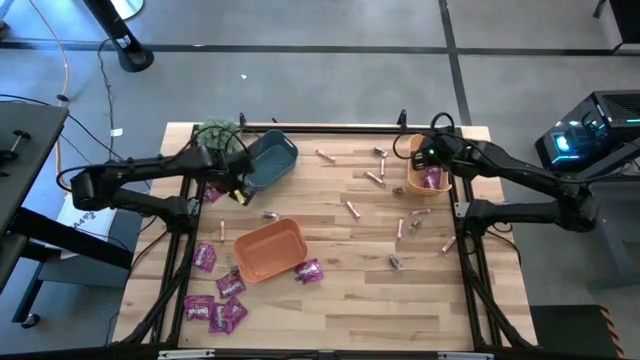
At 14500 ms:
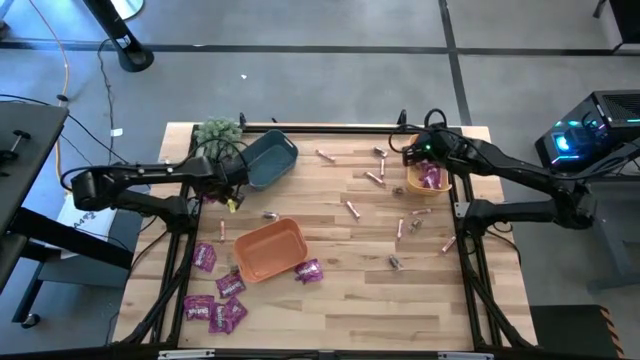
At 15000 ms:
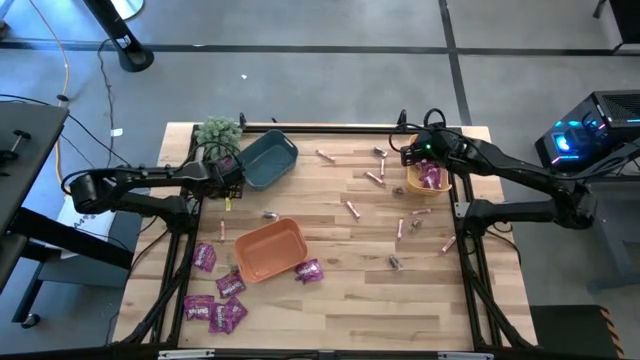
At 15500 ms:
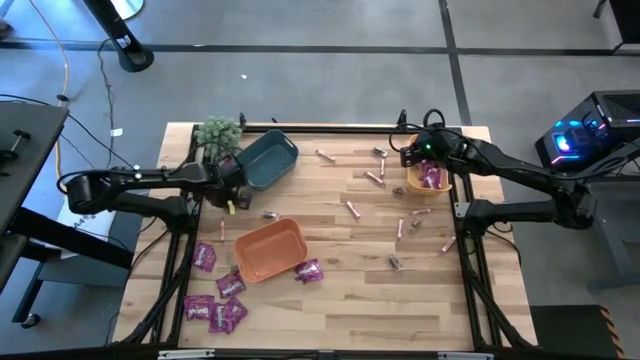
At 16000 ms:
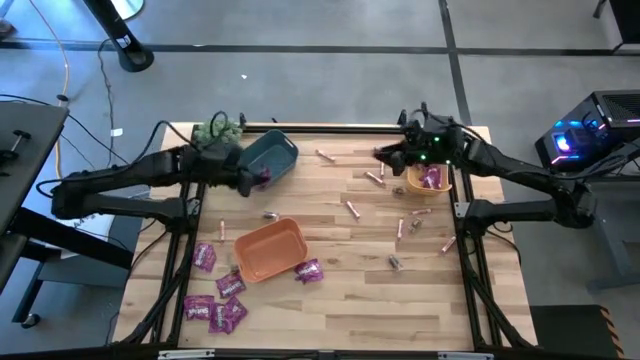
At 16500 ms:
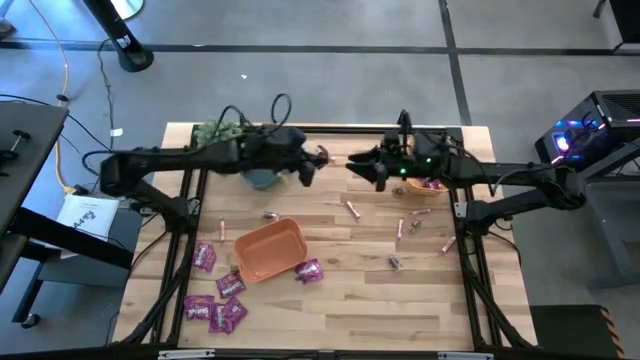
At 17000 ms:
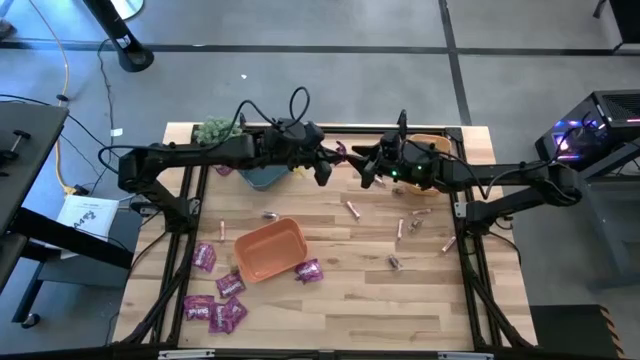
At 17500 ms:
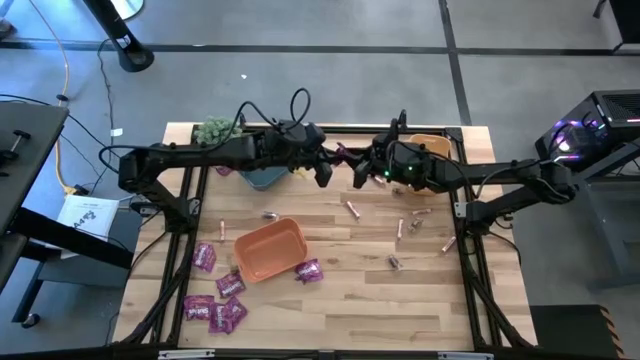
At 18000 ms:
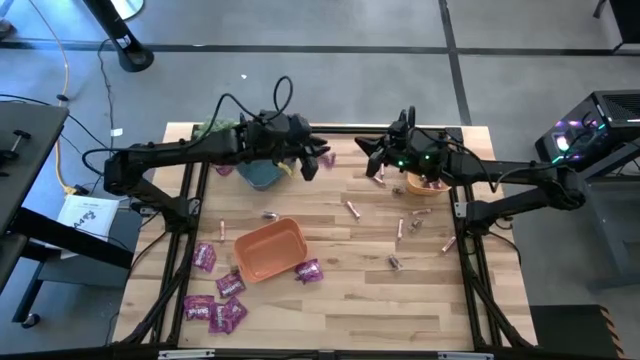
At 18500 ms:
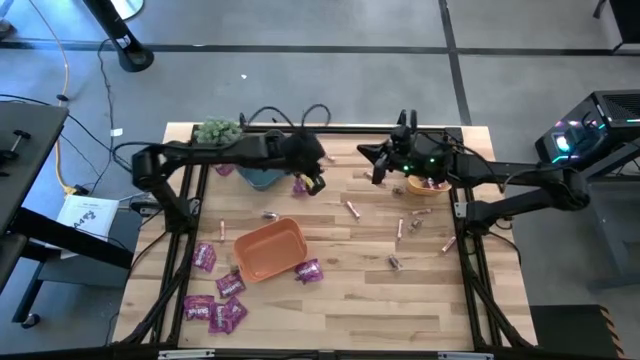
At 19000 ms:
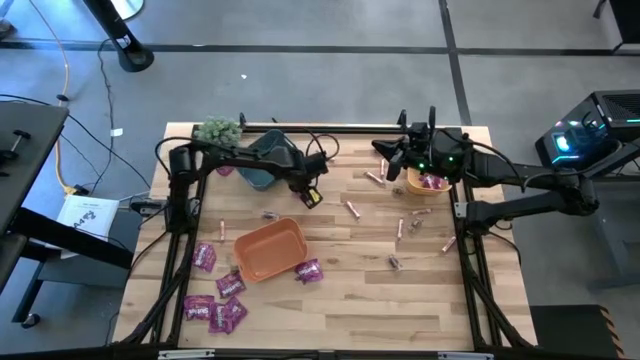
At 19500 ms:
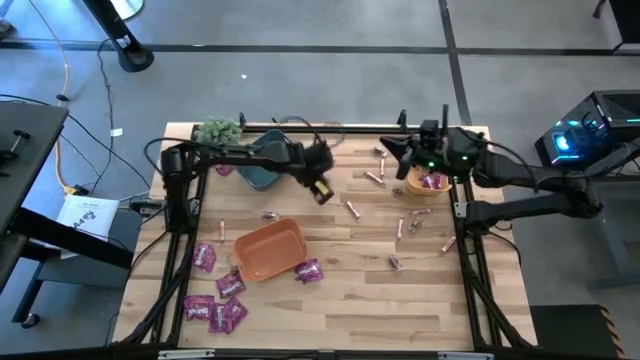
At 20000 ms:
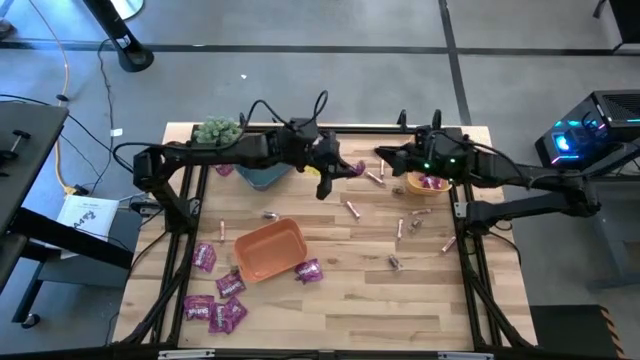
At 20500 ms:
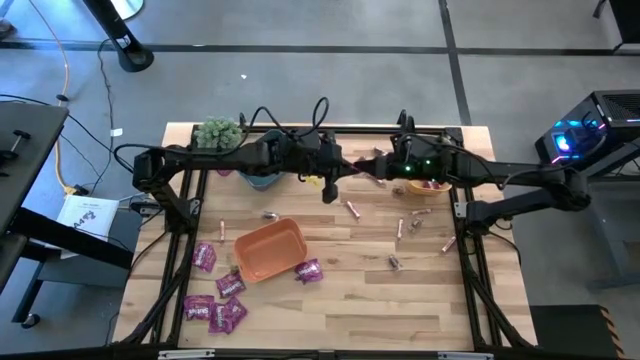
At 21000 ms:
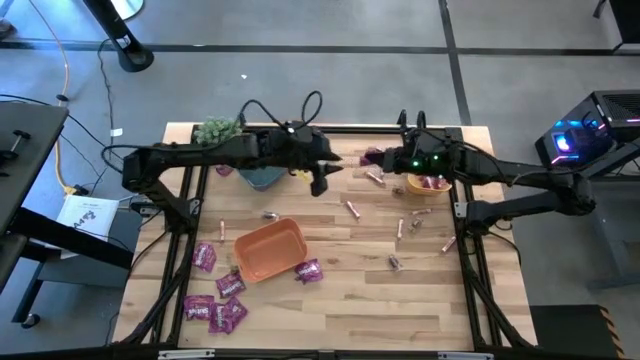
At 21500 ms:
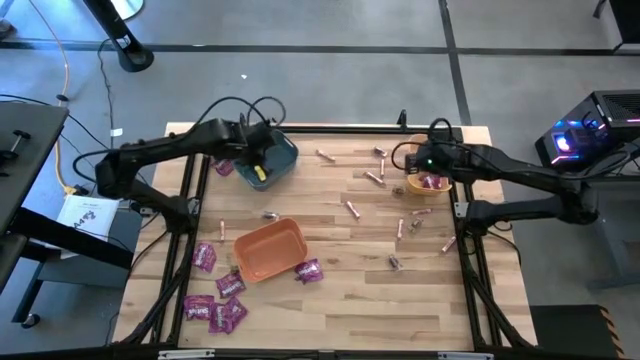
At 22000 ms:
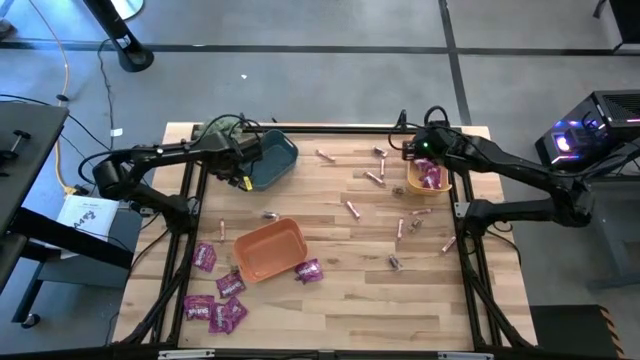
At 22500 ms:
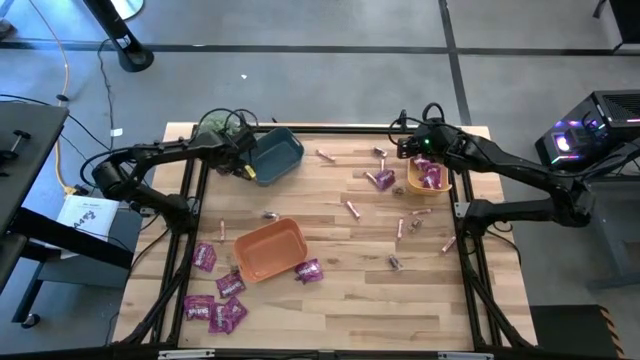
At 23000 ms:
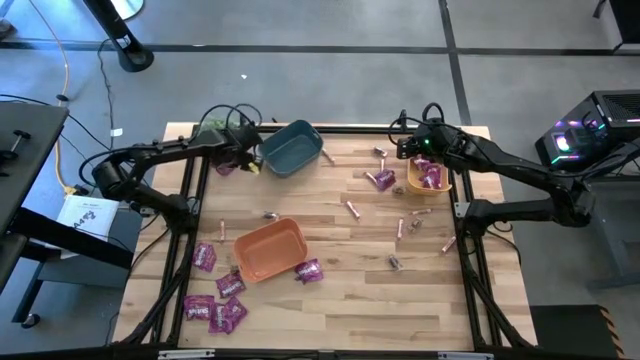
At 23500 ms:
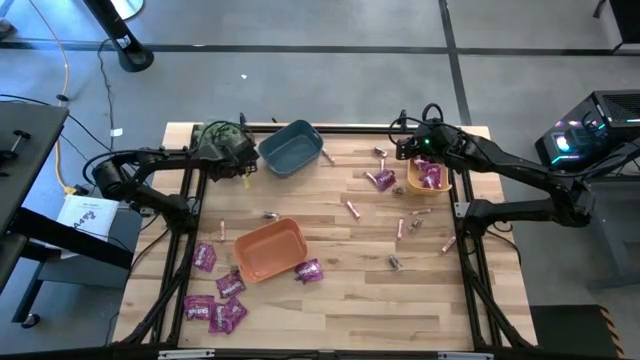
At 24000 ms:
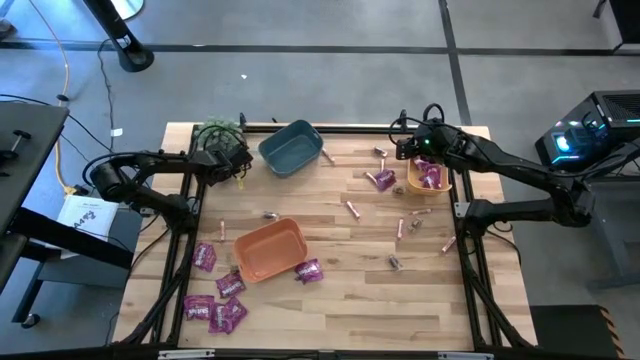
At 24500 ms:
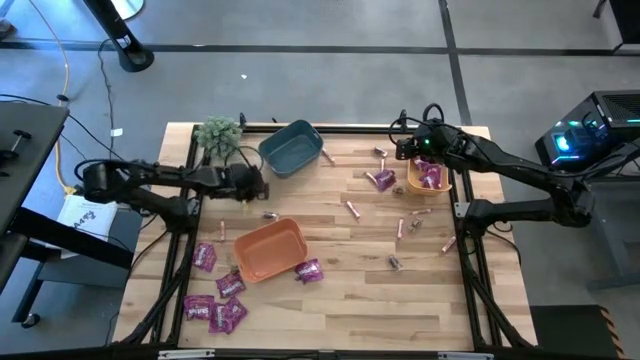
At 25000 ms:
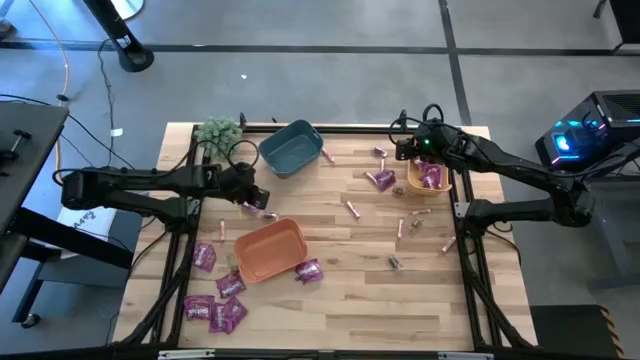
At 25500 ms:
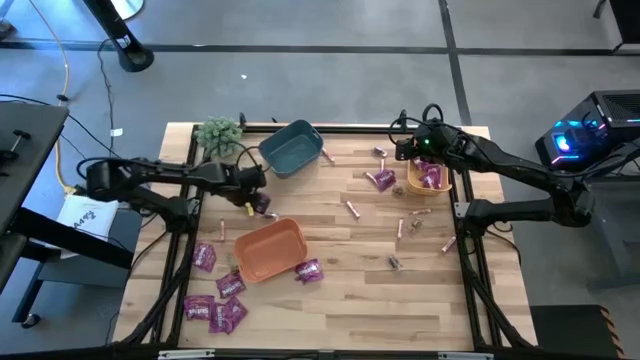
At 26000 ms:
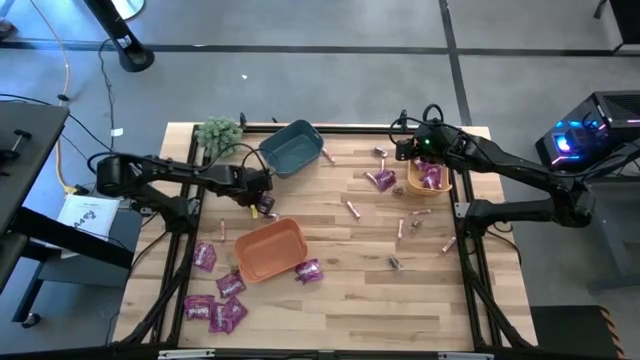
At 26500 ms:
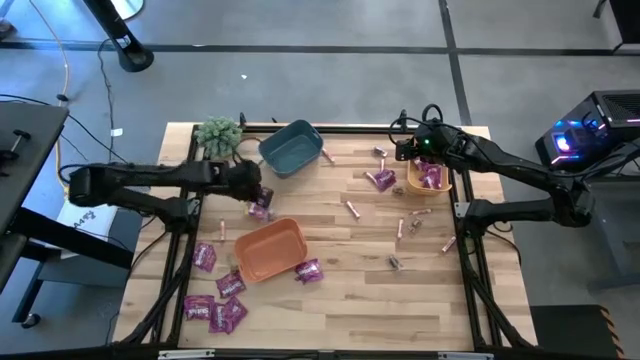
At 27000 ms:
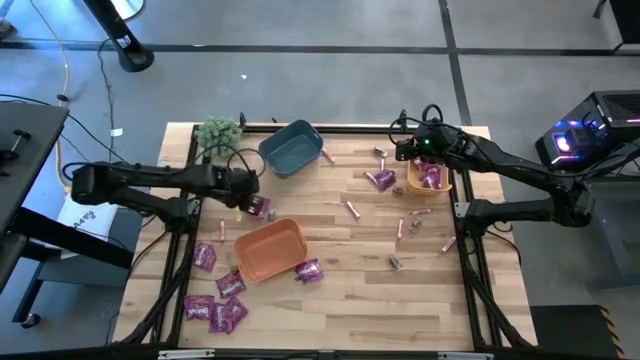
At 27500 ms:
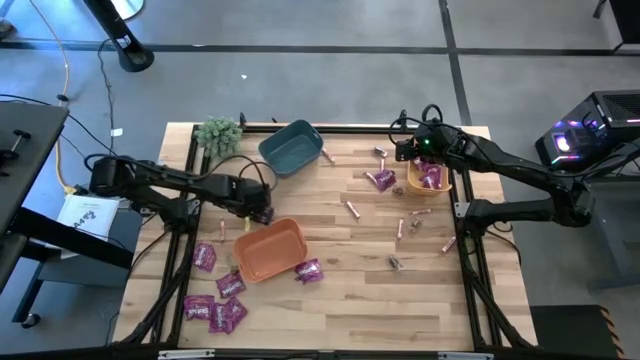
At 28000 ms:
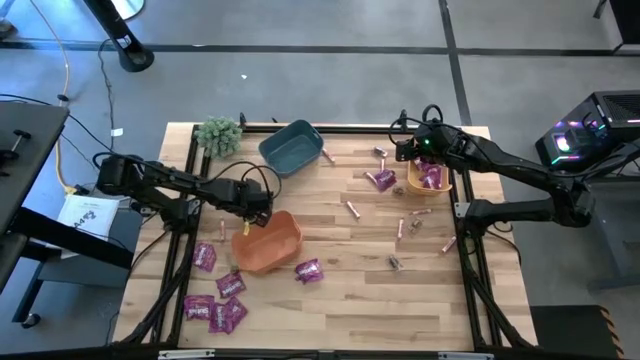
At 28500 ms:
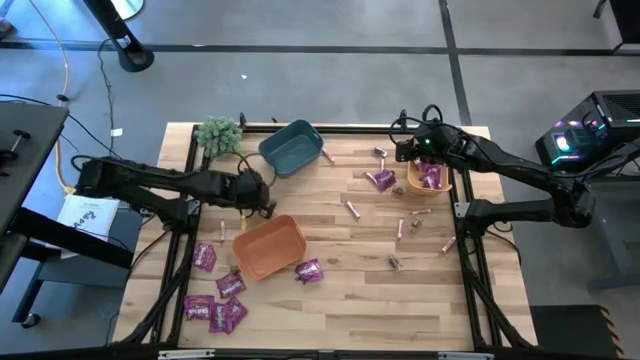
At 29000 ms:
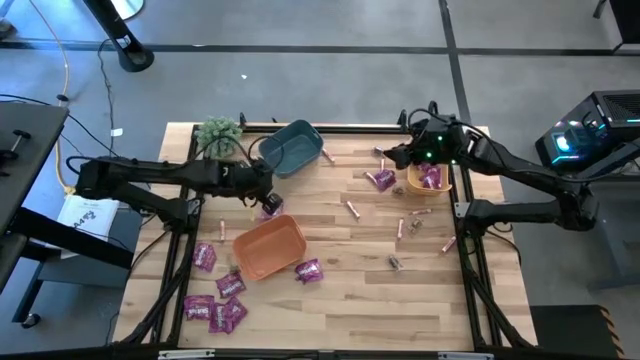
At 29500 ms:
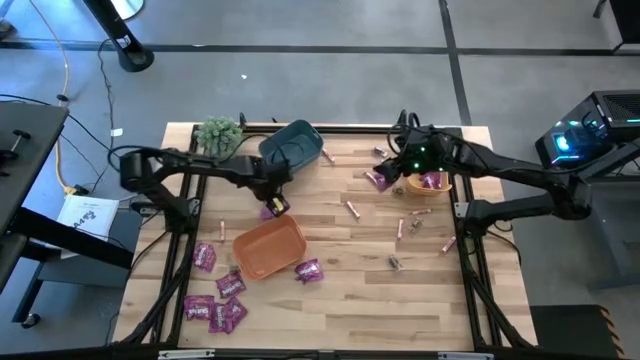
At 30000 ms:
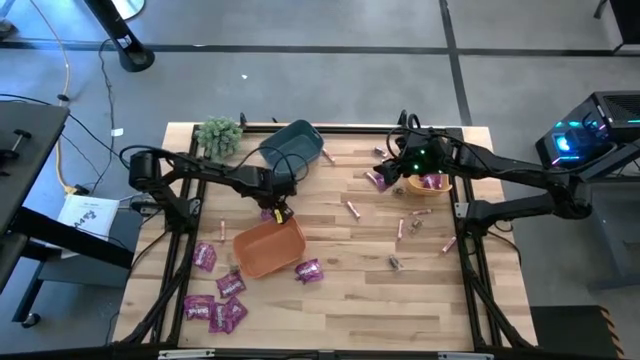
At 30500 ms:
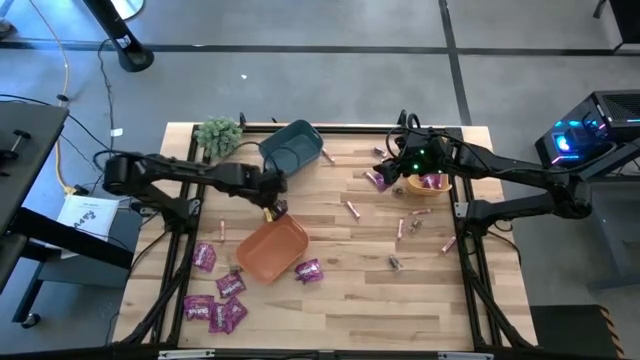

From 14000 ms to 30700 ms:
Task: Sort candy
Put the purple candy into the yellow bin

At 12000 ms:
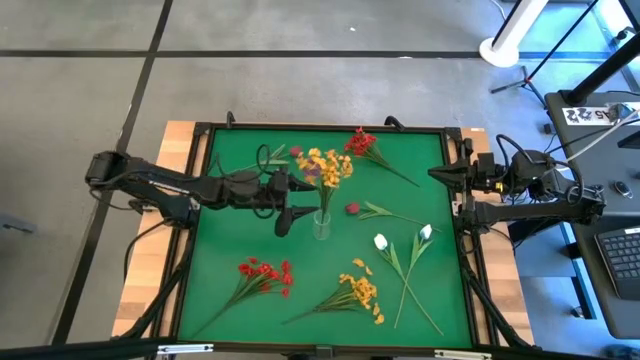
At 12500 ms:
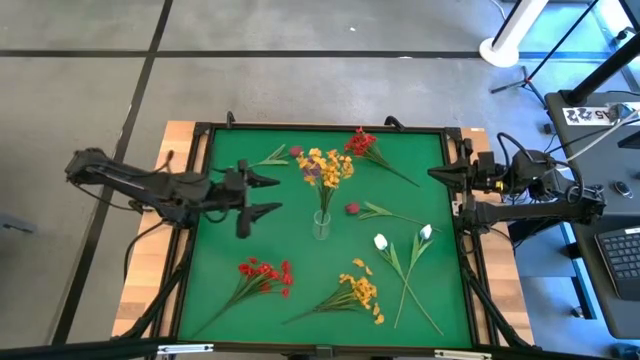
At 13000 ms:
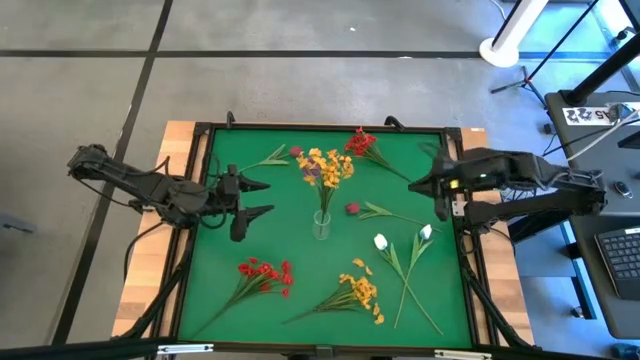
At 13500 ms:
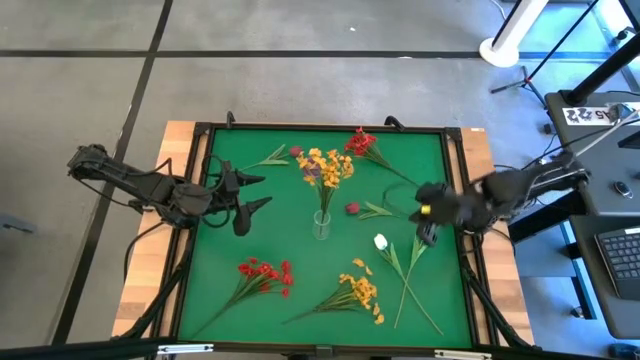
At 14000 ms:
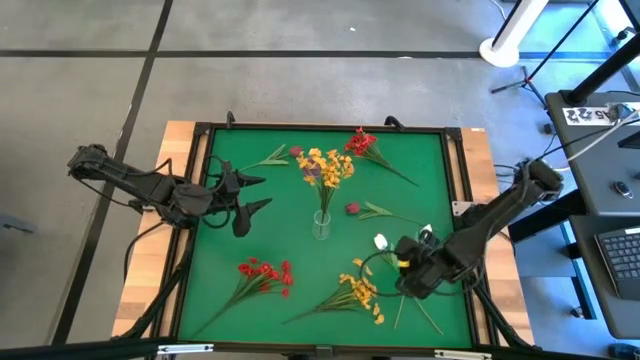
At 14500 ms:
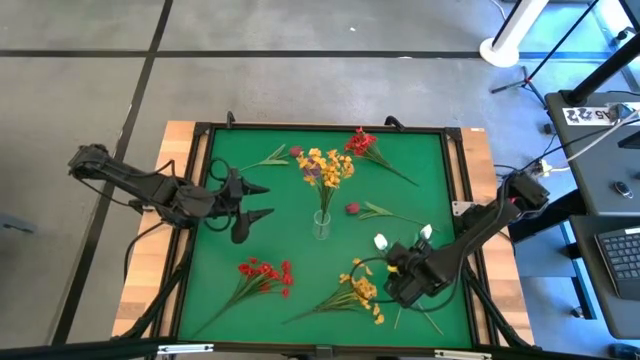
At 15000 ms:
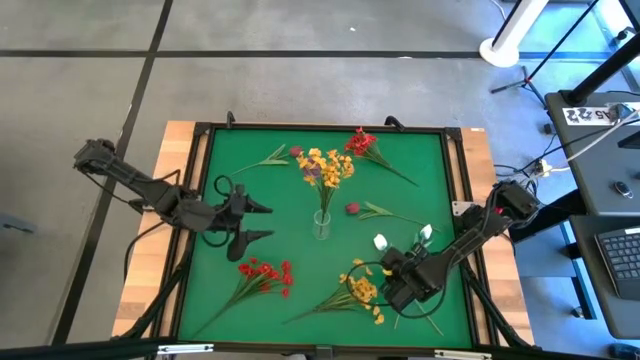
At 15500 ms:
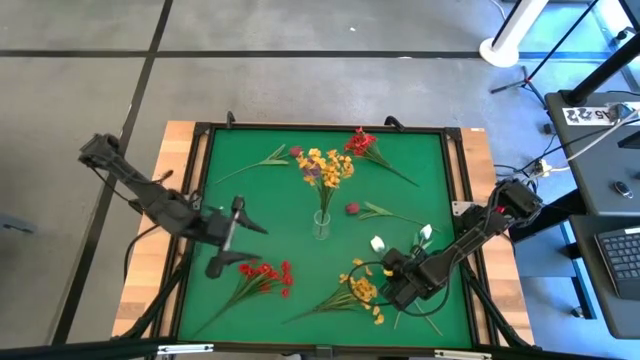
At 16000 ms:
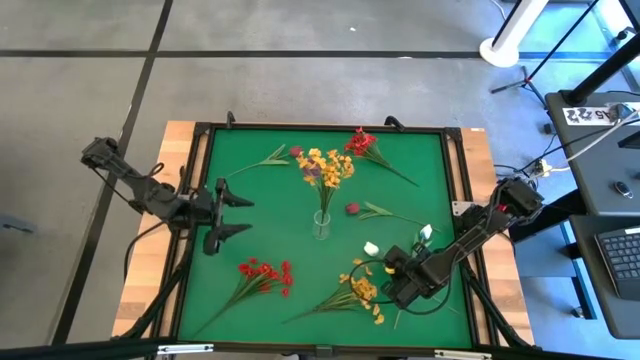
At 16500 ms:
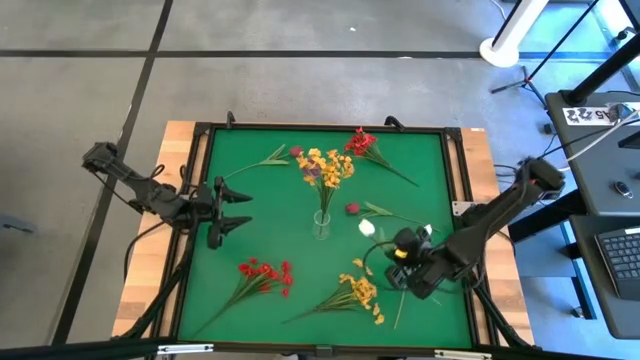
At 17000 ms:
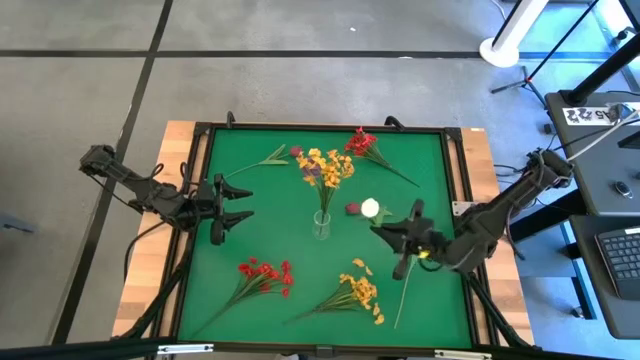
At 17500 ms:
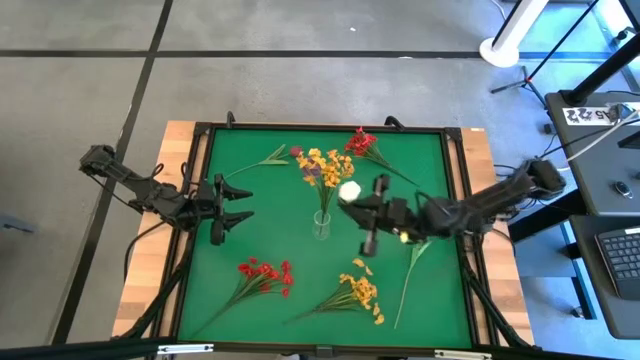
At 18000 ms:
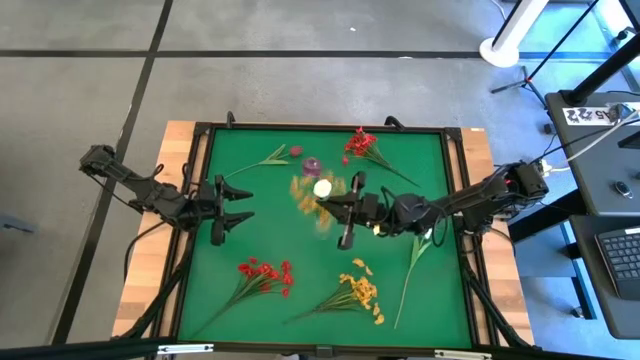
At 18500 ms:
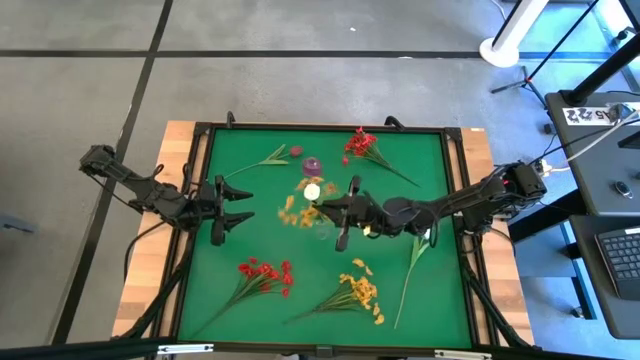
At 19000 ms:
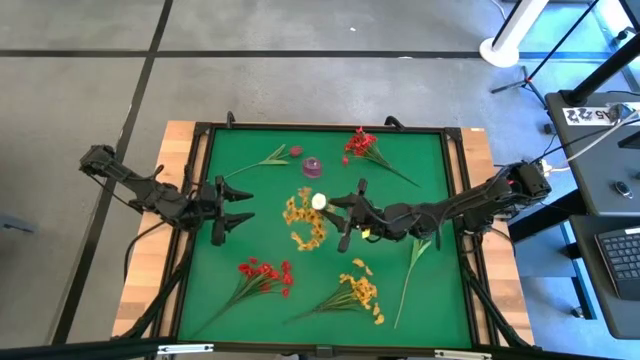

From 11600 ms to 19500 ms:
Task: Sort flowers into vase by color
Put the left white flower into the transparent vase
